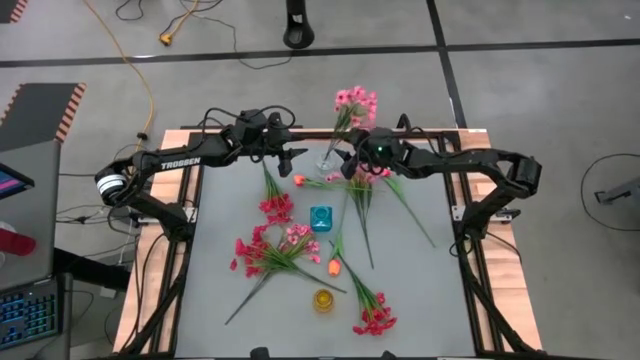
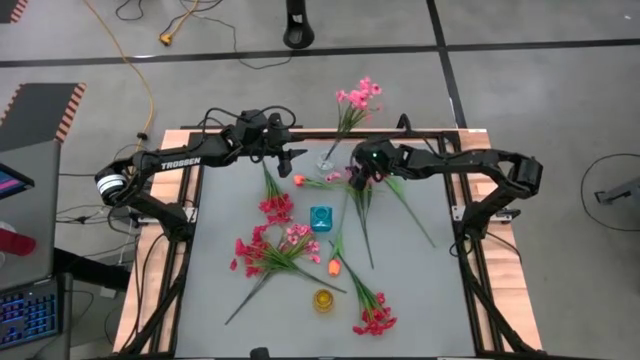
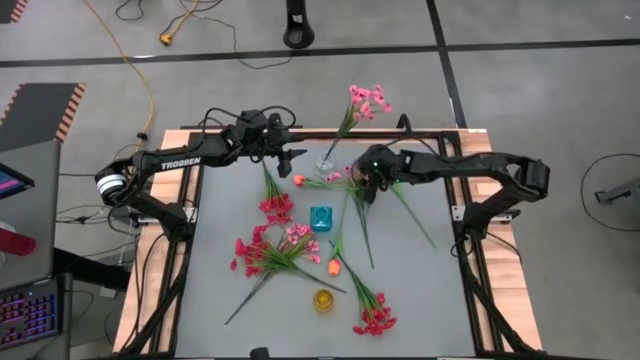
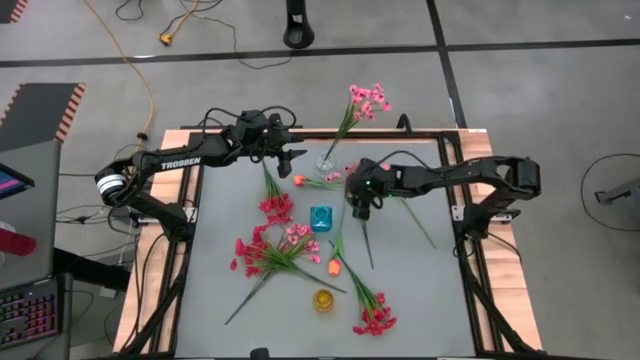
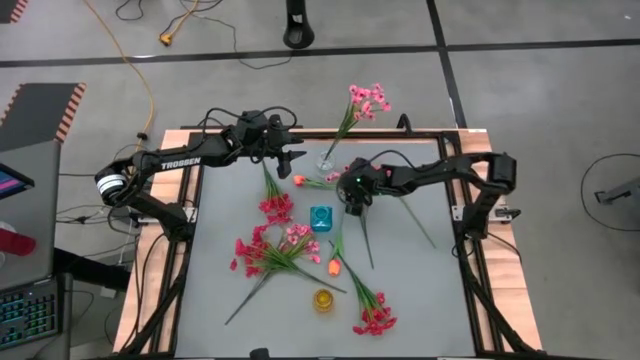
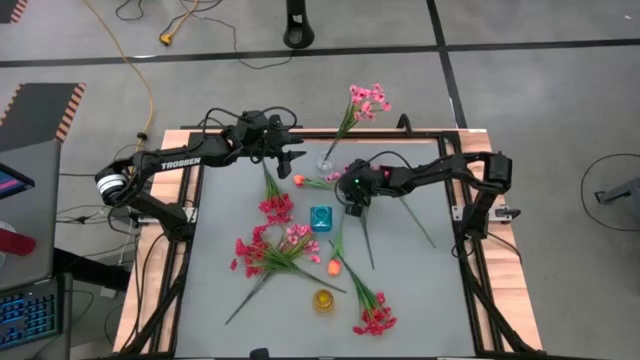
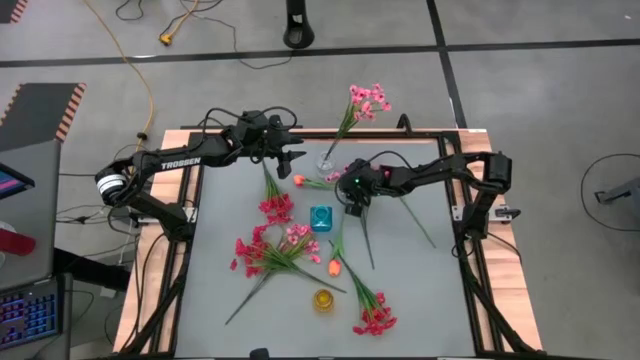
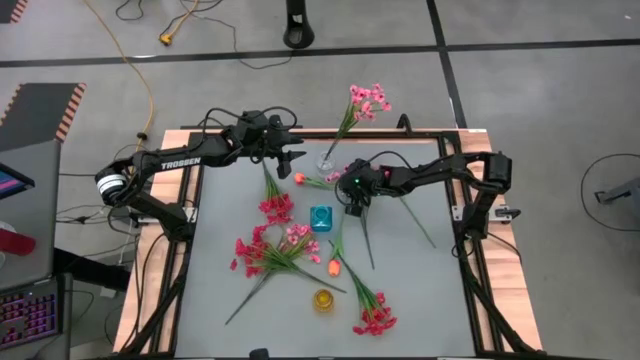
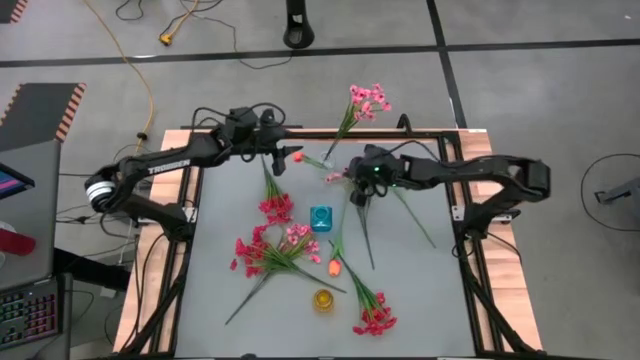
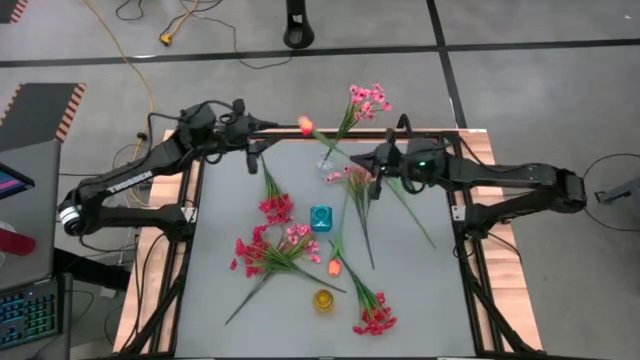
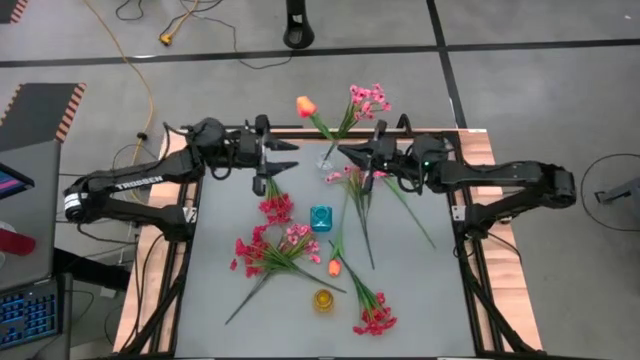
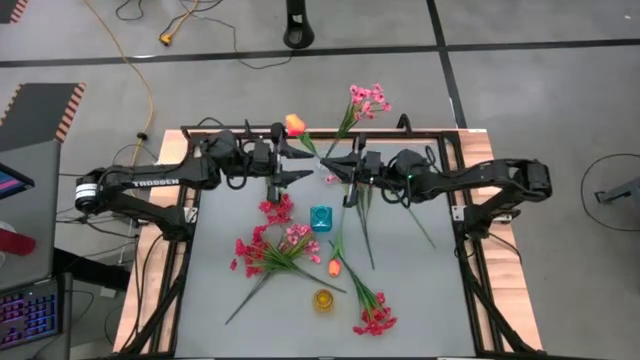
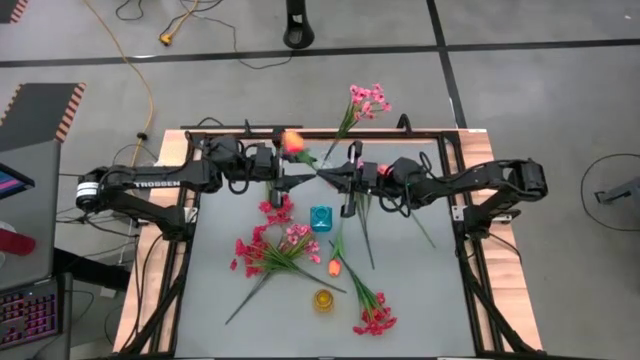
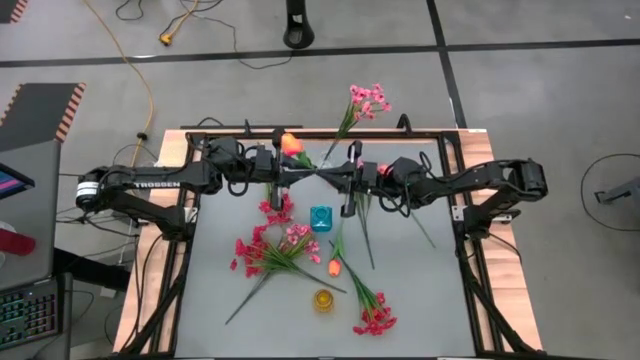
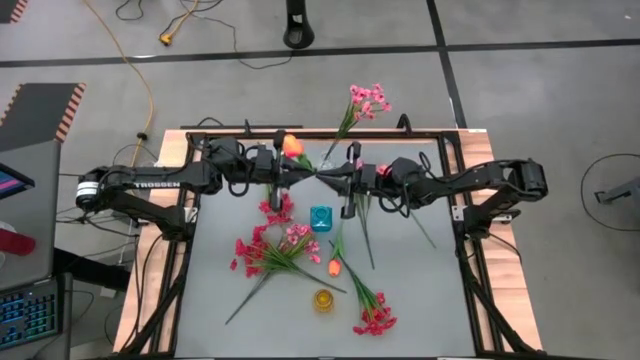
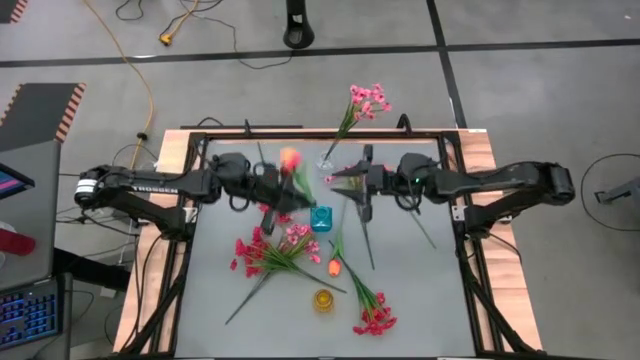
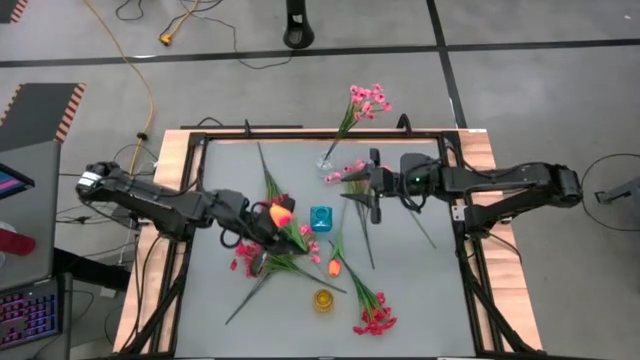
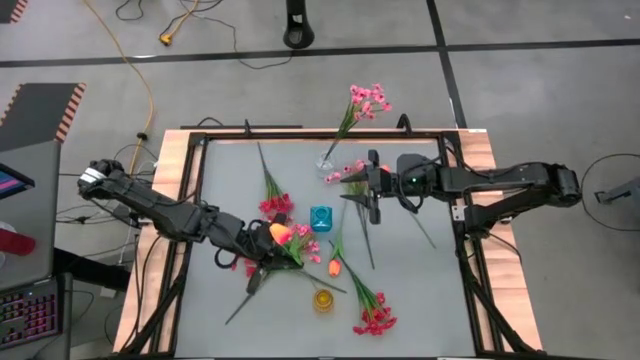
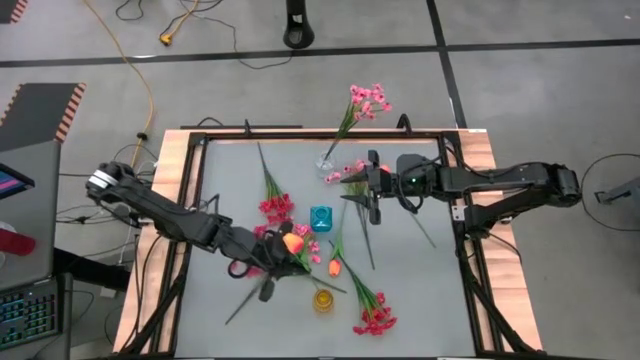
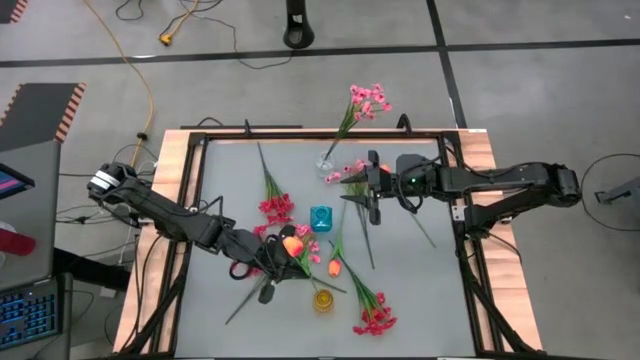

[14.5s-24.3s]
Task: Sort flowers into vase by color
Put the top left orange flower into the yellow vase

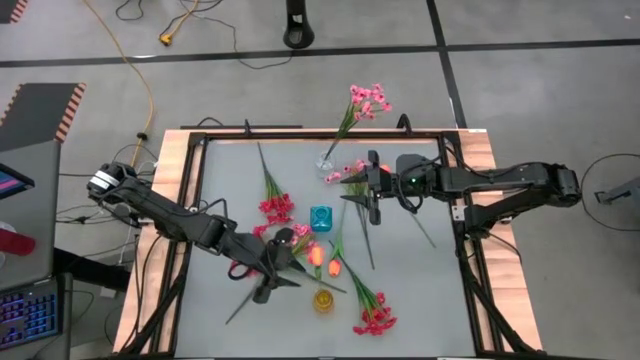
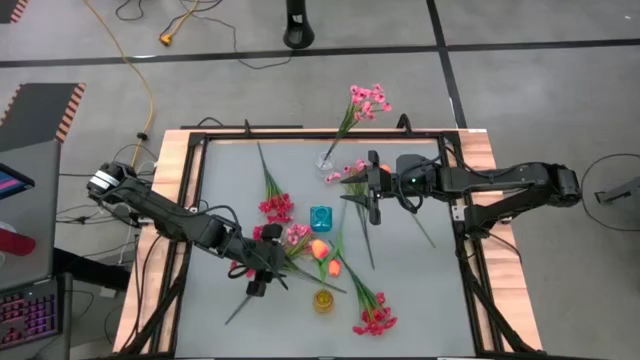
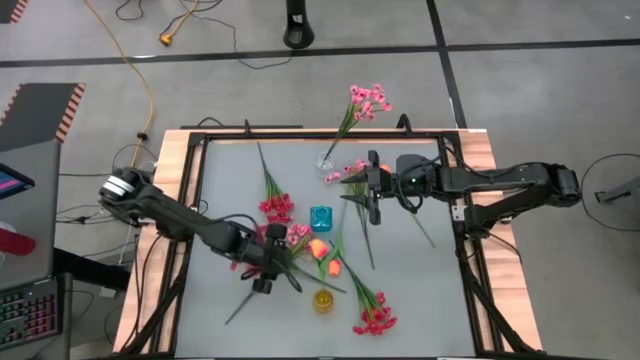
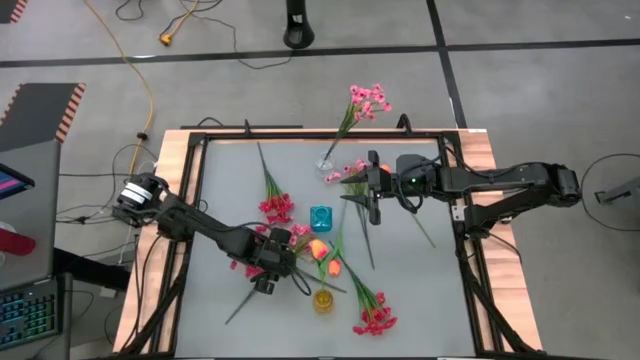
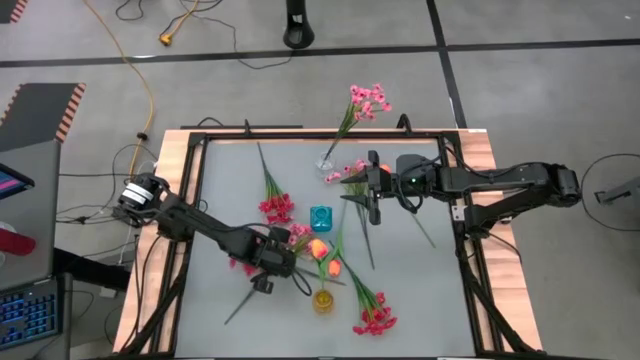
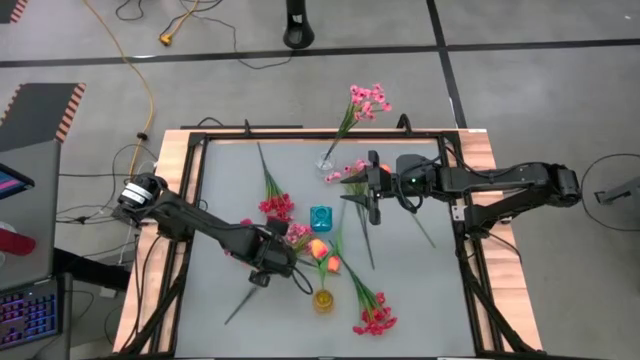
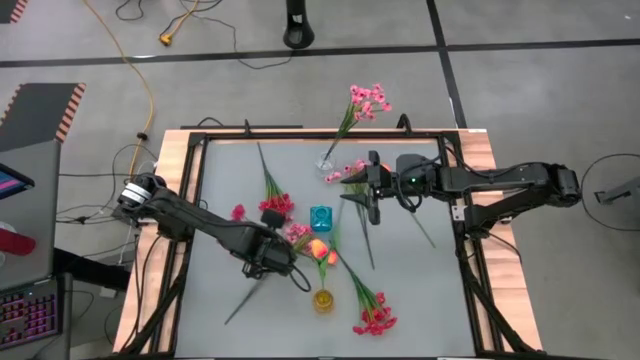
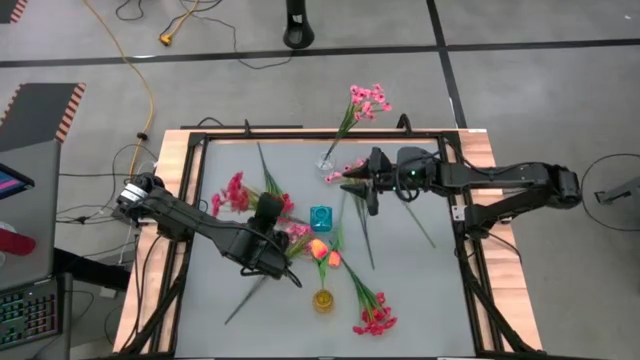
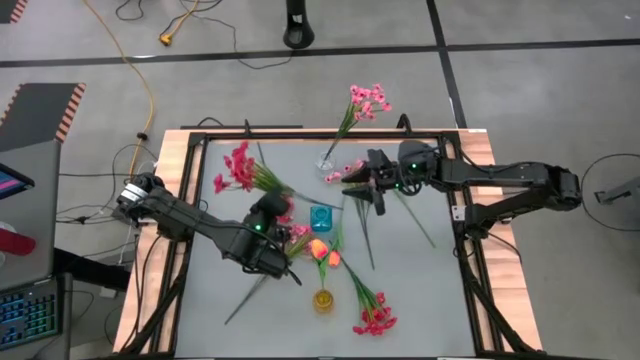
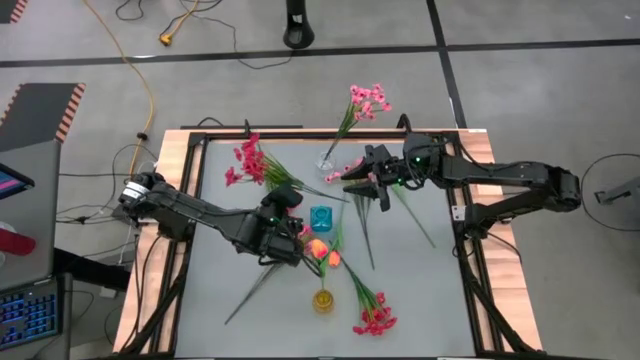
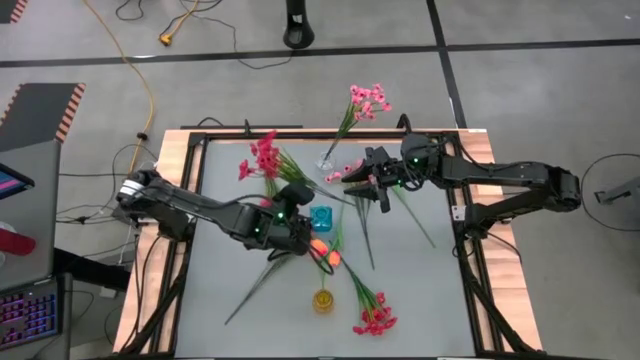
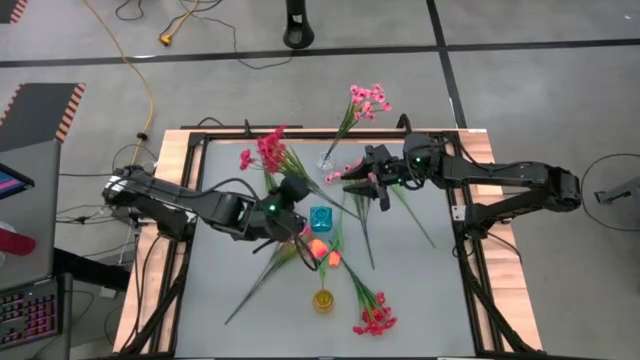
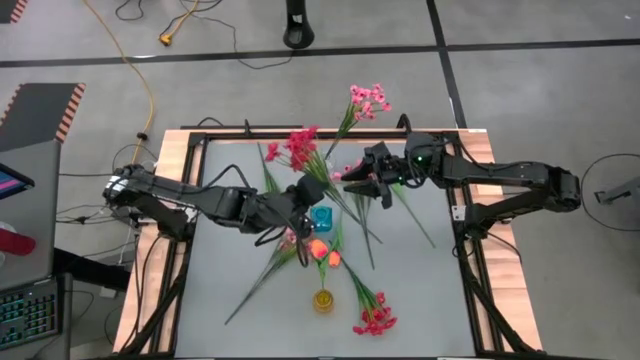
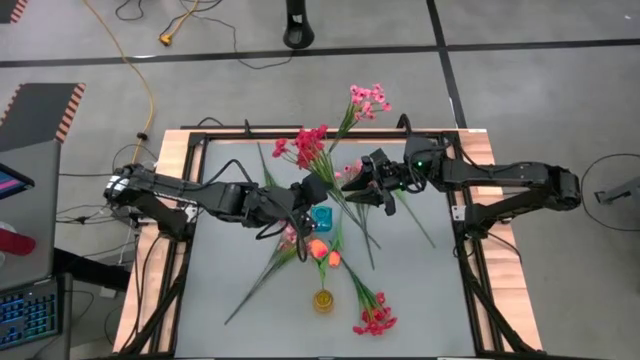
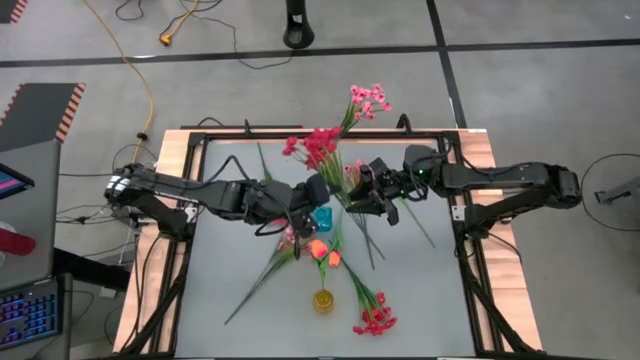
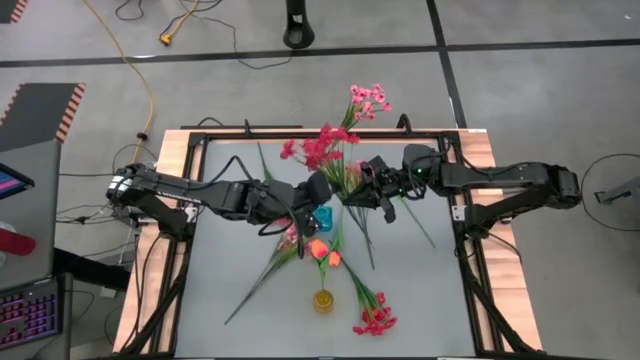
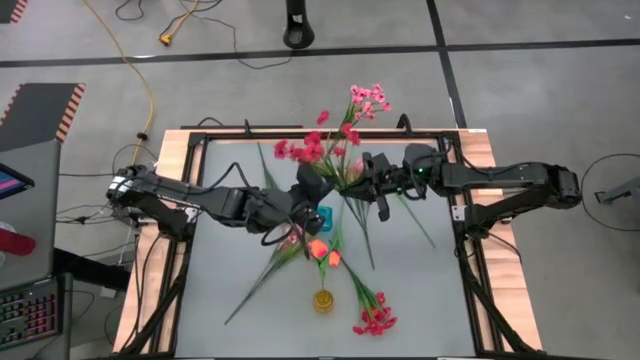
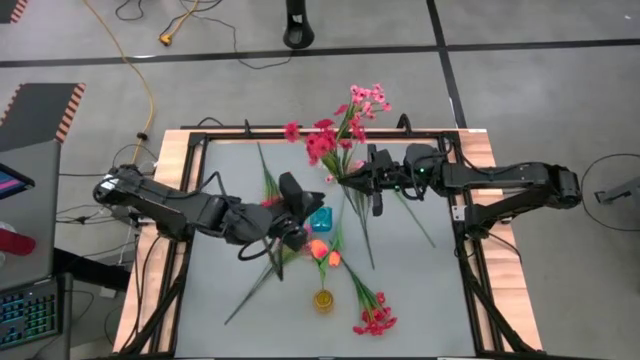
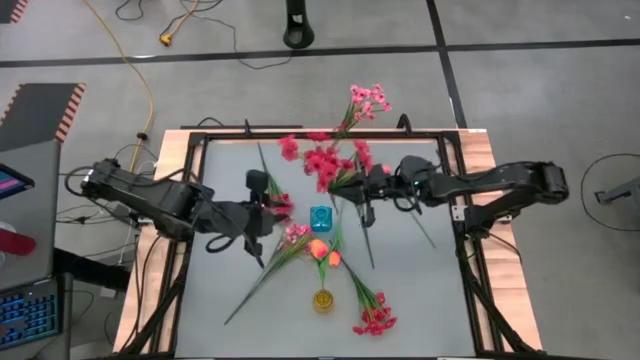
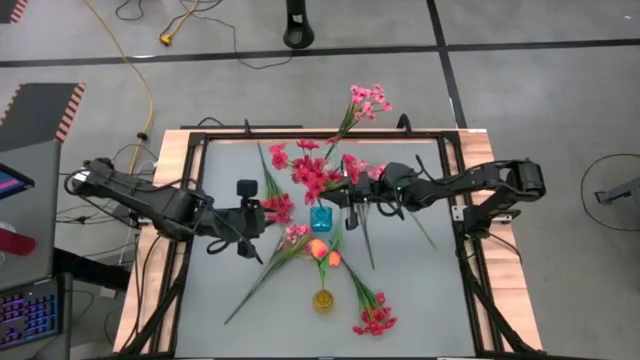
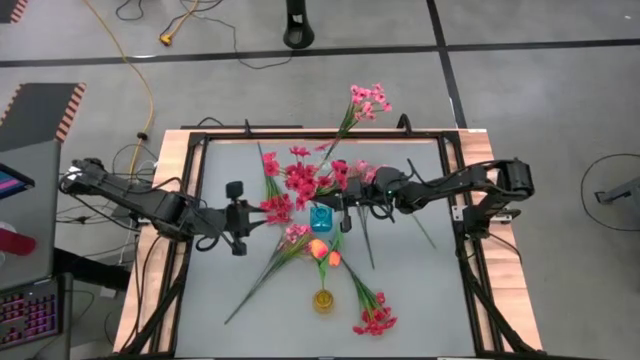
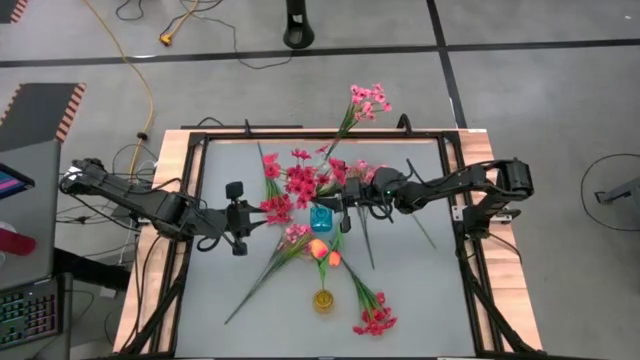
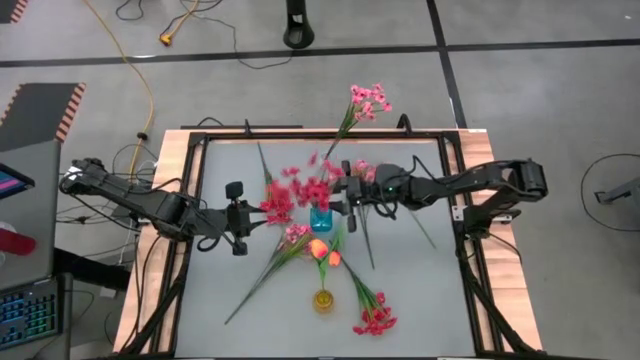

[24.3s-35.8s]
Put the middle left red flowers into the blue vase

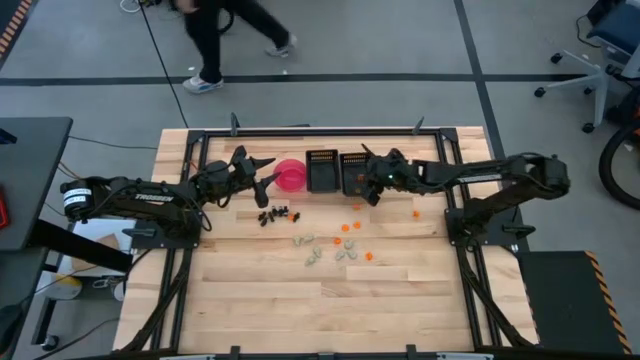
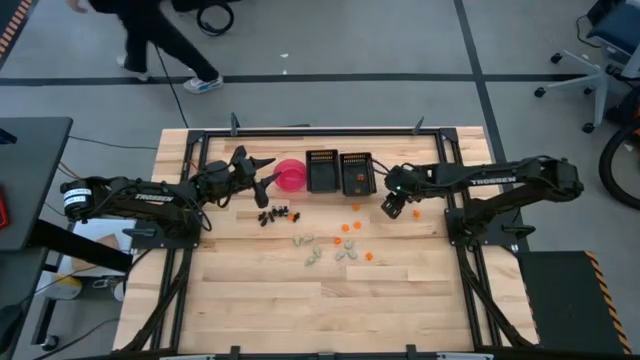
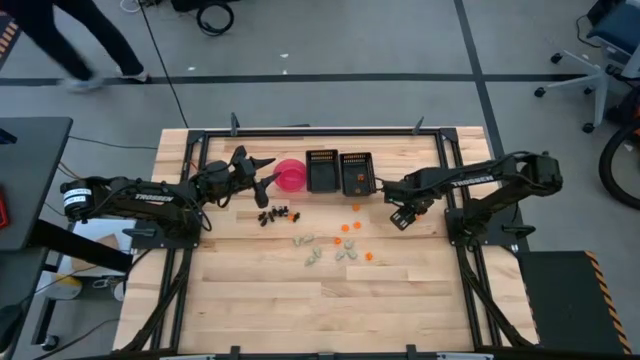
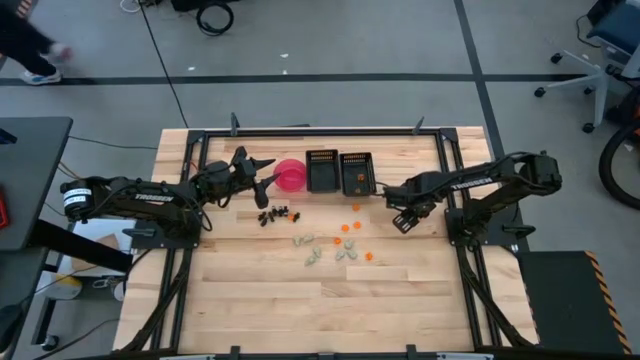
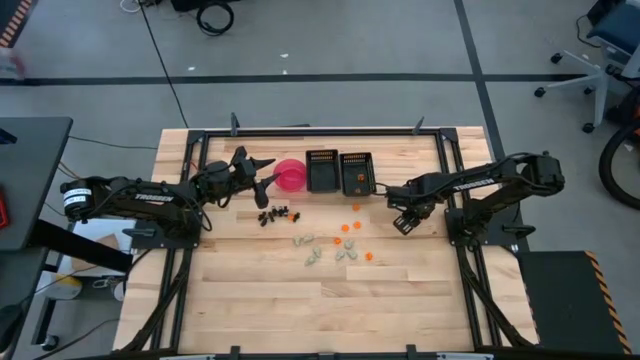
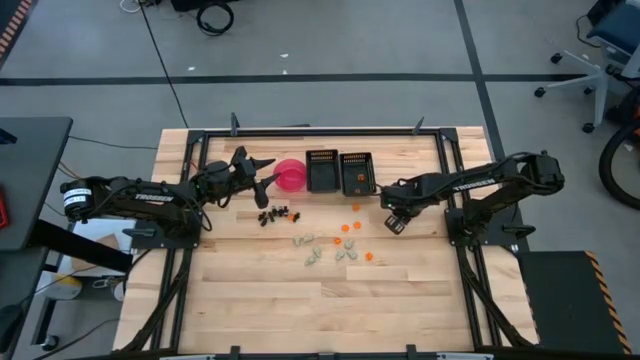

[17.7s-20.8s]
Task: Sort Halloween decoration
Put the orange pumpkin toy into the right black bin
